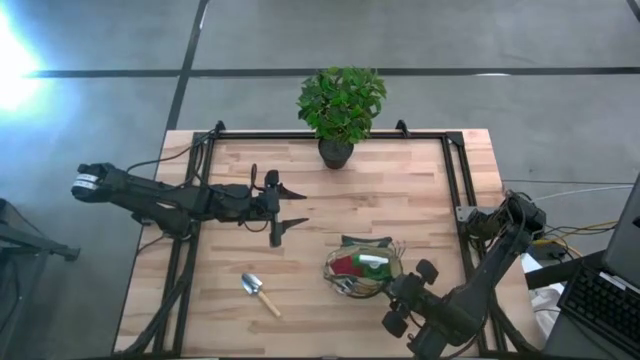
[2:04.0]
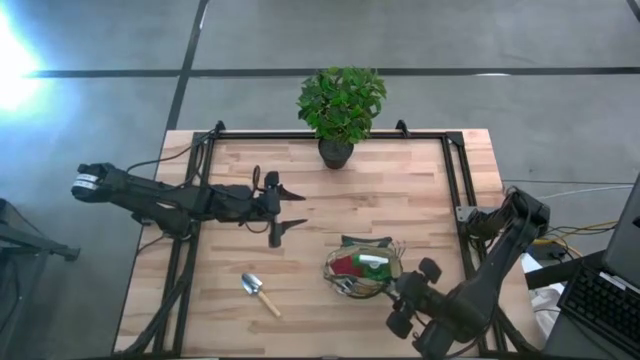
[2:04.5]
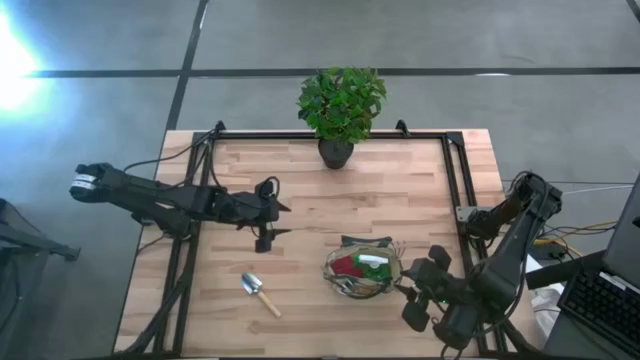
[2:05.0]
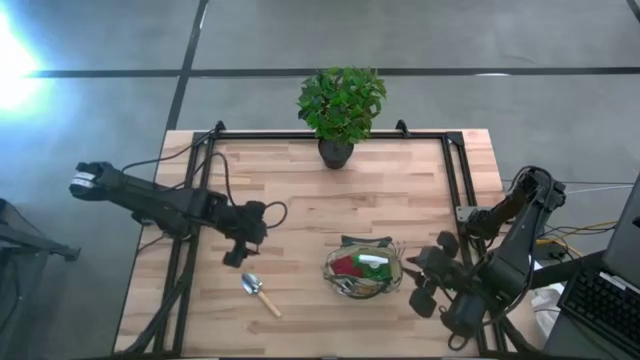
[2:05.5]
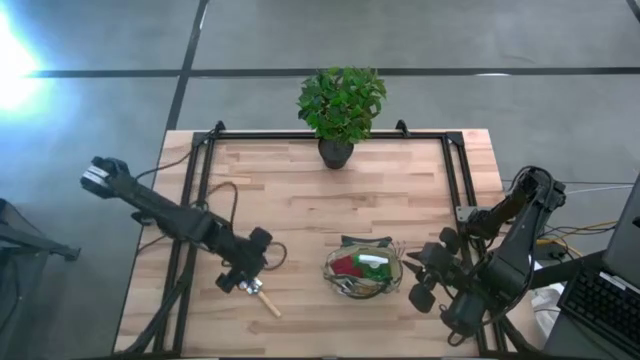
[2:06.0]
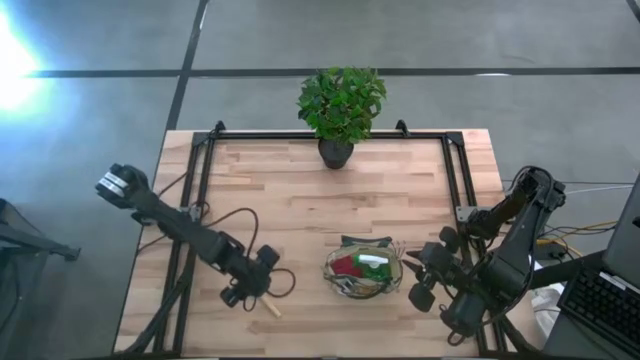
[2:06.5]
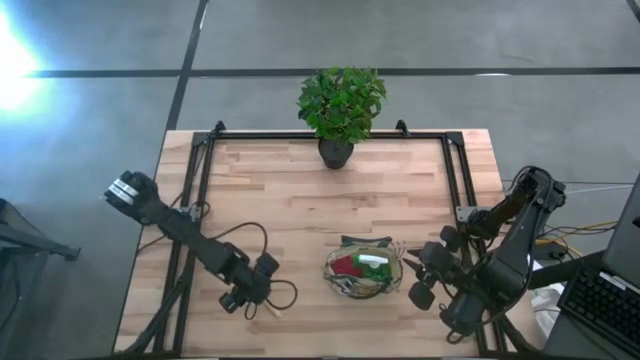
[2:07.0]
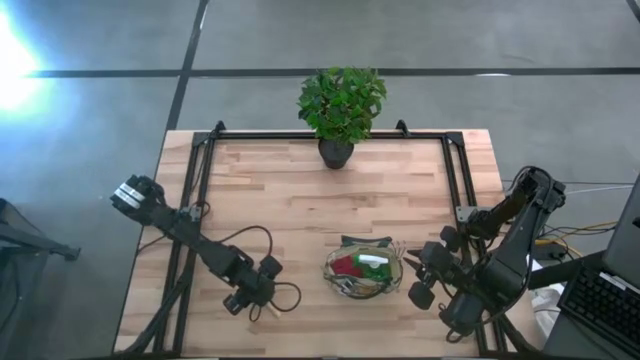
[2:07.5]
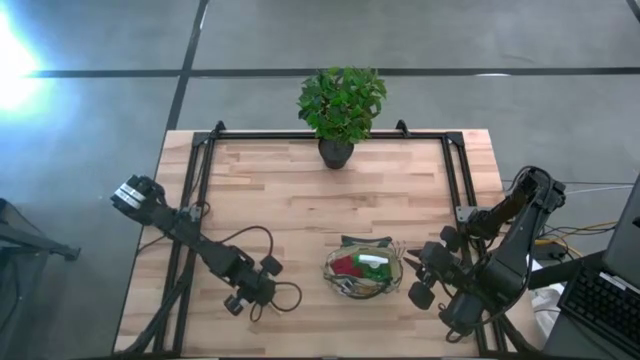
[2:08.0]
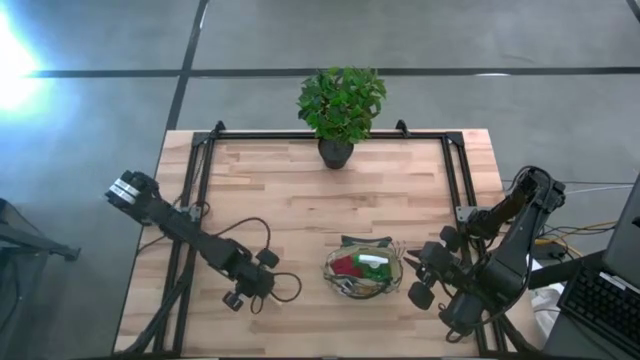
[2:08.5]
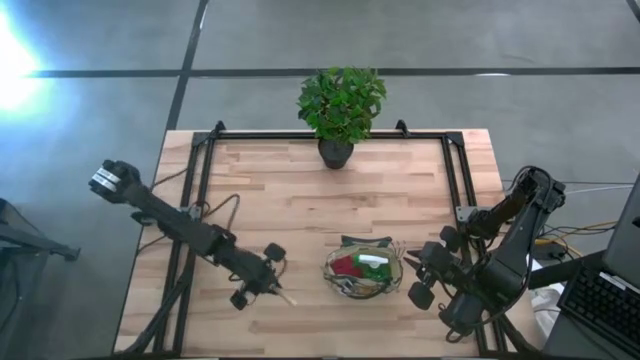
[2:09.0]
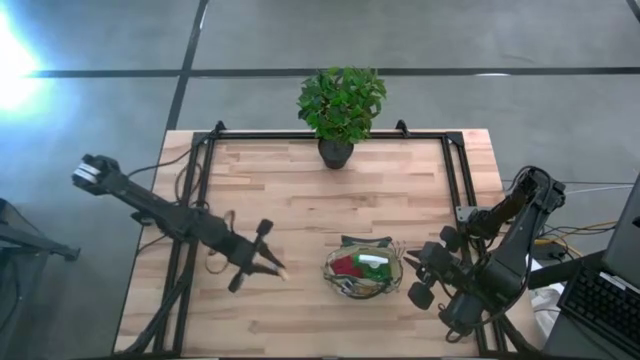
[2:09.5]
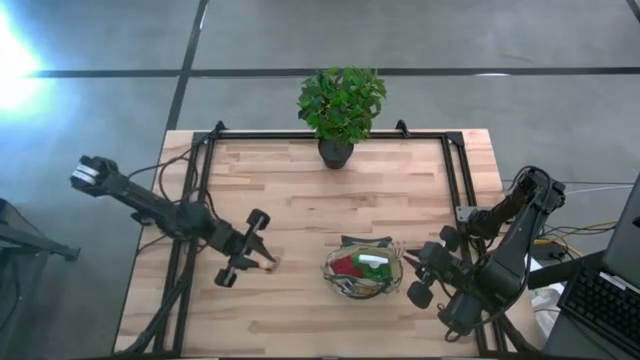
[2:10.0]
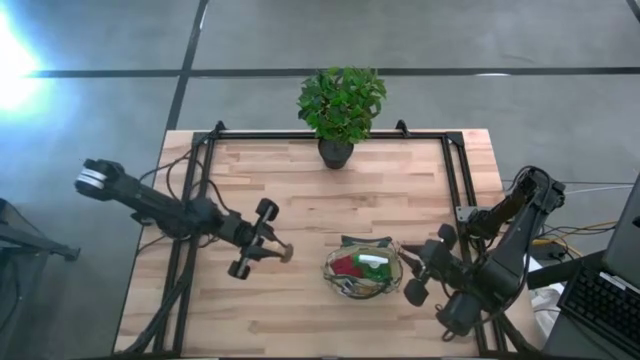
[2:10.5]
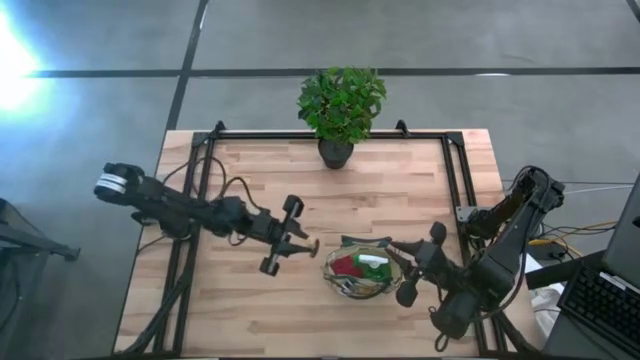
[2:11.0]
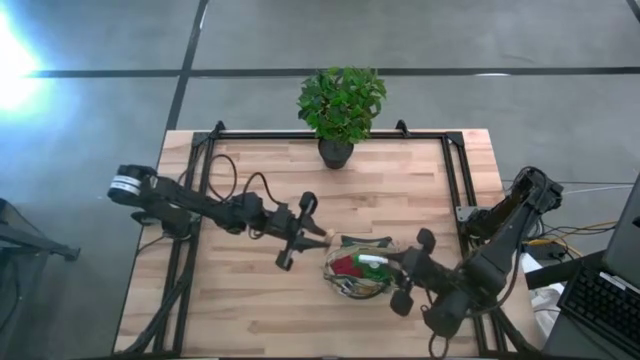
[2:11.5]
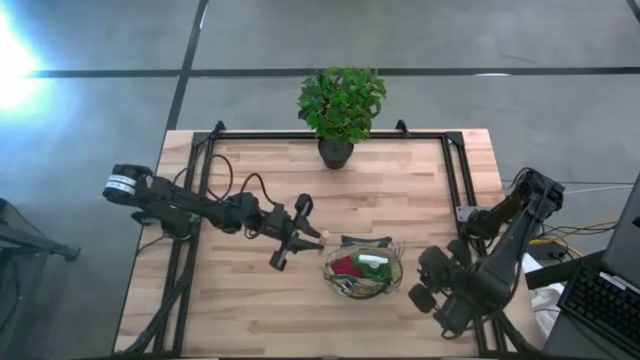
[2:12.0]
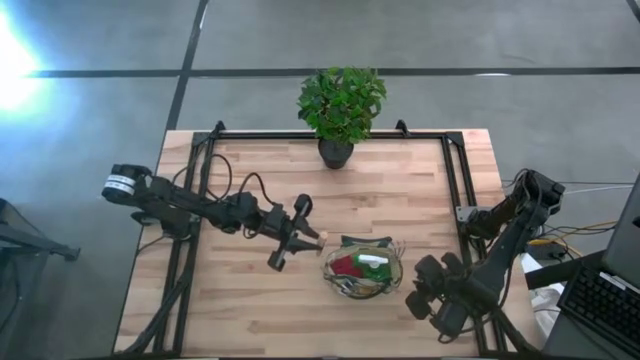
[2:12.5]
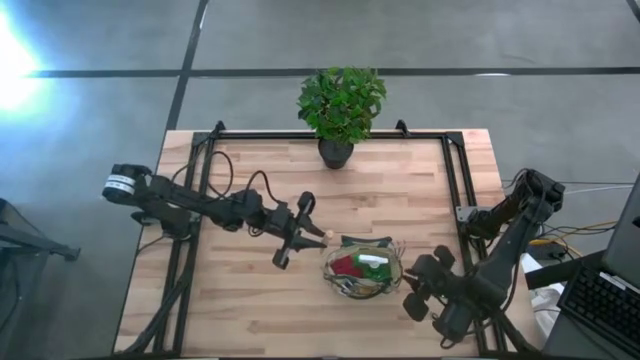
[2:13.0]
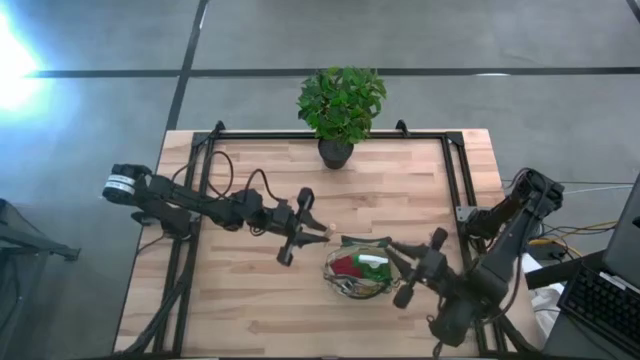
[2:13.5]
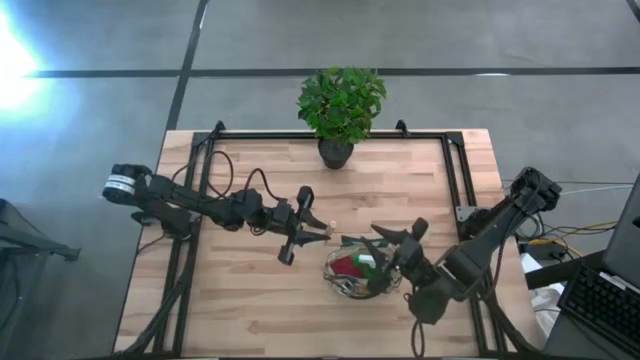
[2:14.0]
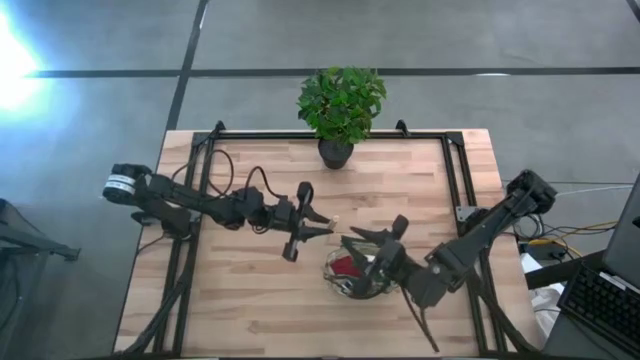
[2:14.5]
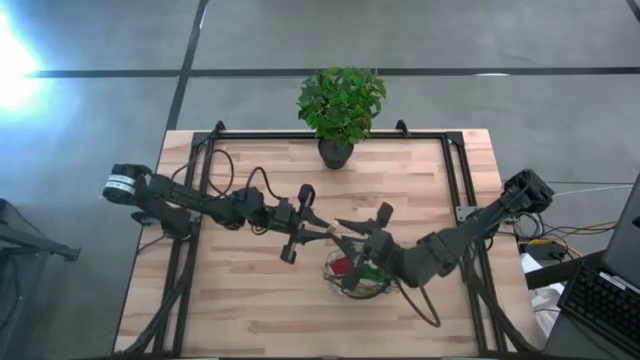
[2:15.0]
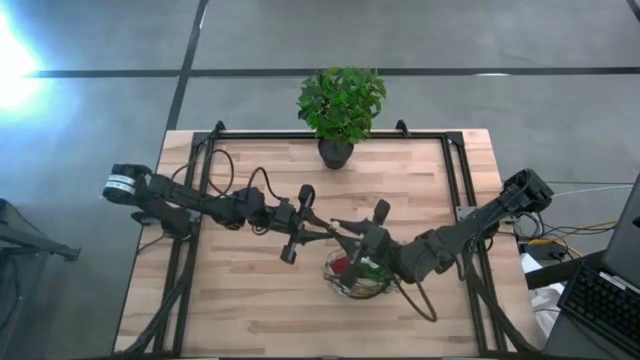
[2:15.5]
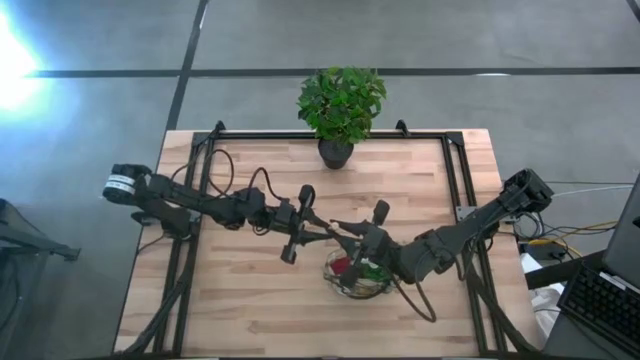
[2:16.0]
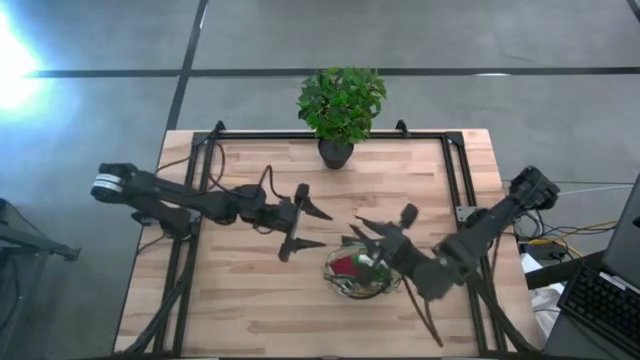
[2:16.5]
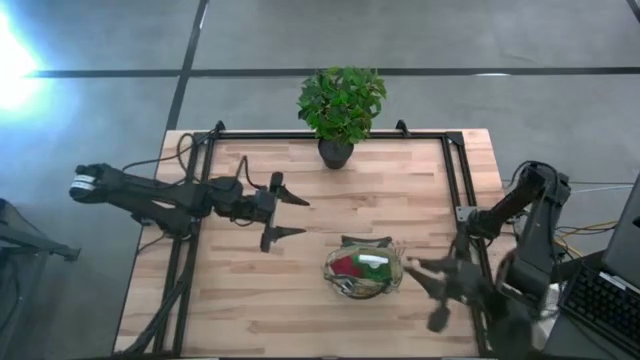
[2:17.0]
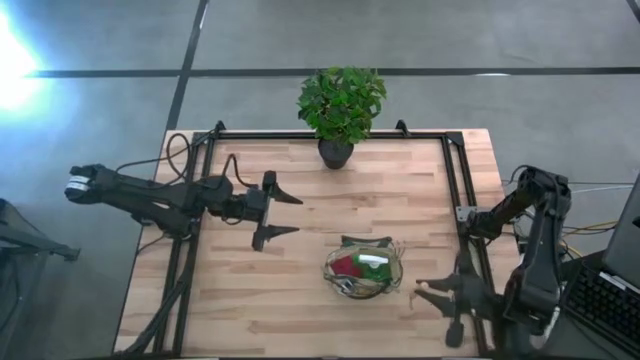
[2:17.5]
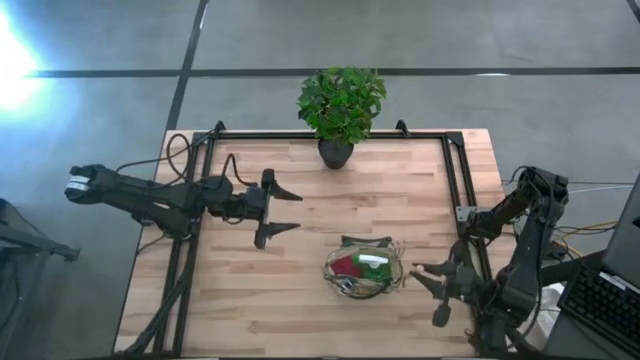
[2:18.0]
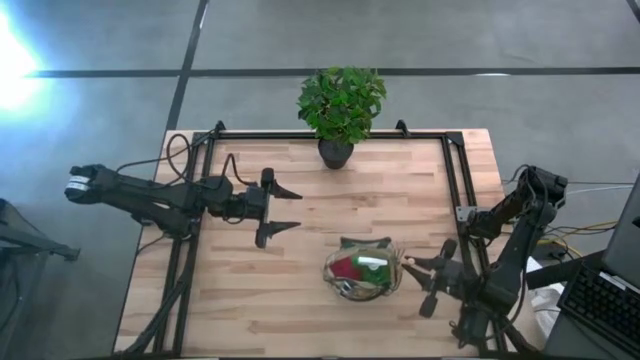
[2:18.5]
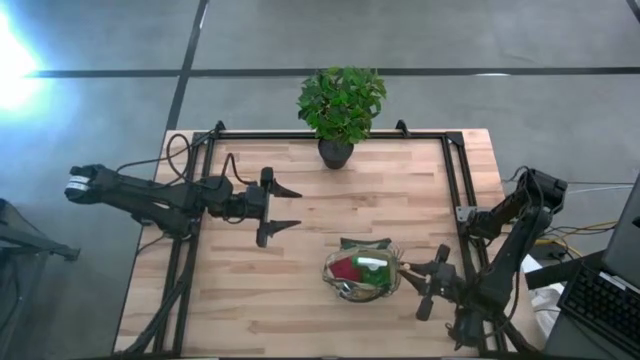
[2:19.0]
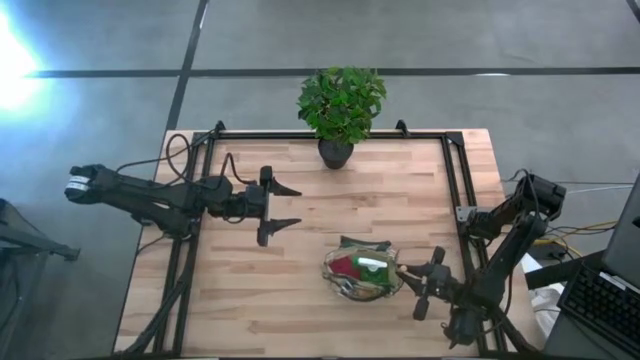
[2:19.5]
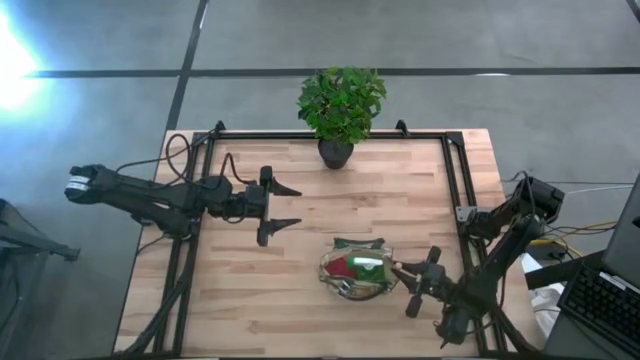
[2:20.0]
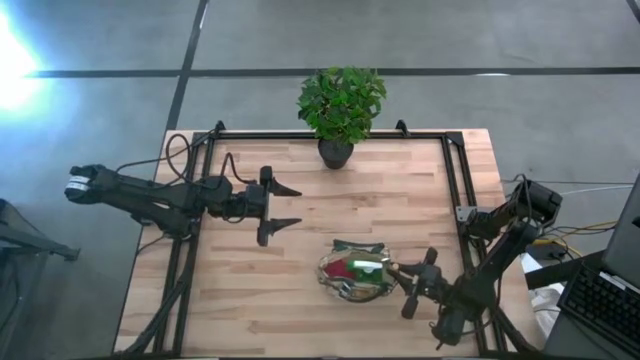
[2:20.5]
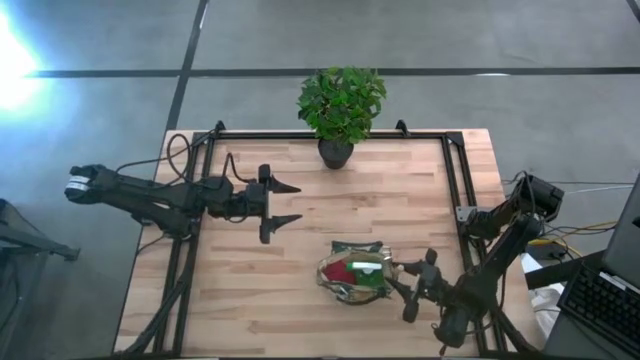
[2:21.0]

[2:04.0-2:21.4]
Task: Pick & Place Garden tools in Gardening bag
Put the brown trowel into the green gardening bag

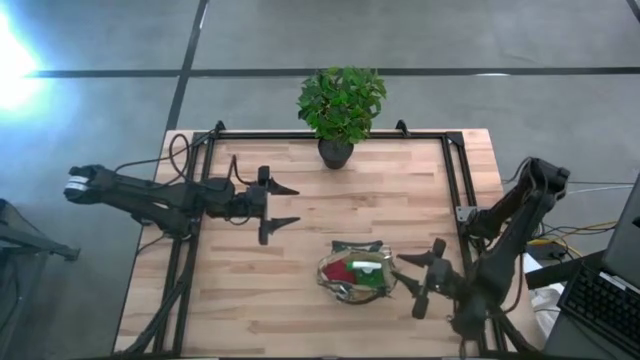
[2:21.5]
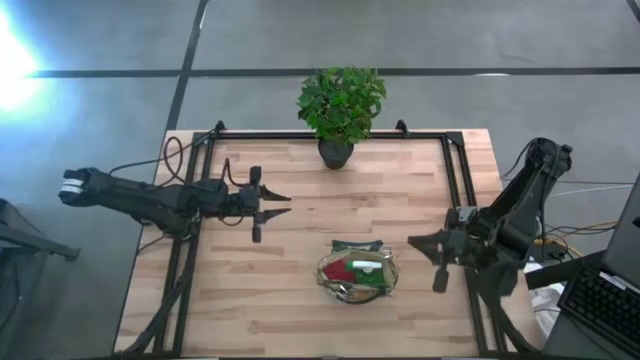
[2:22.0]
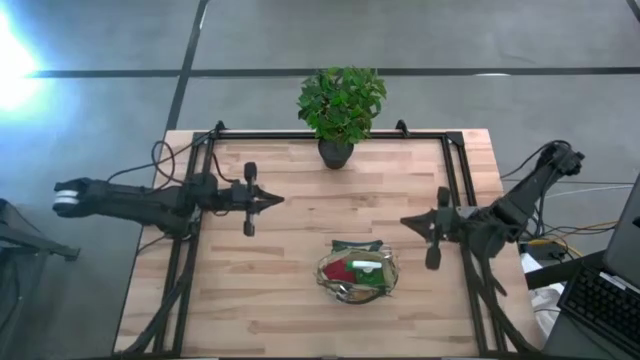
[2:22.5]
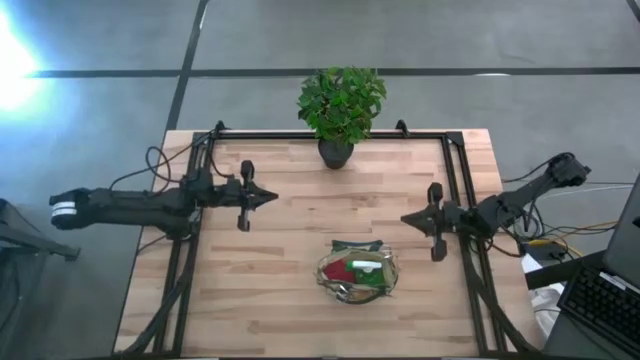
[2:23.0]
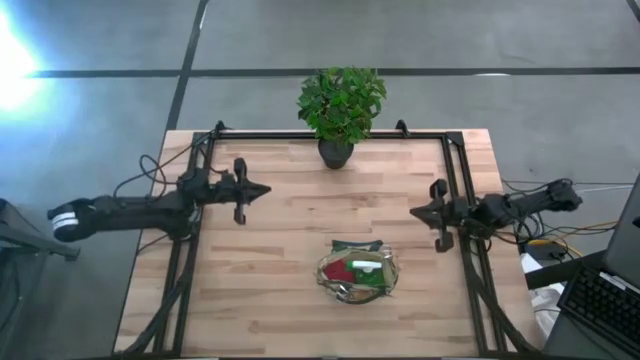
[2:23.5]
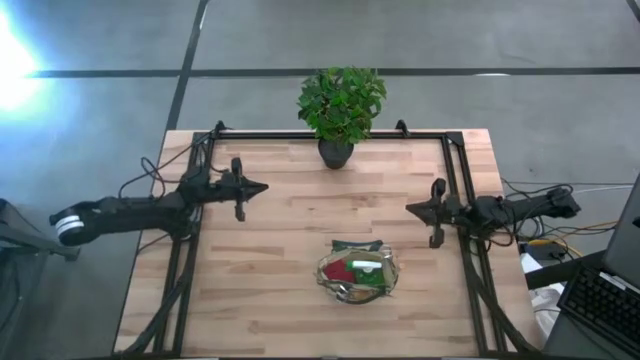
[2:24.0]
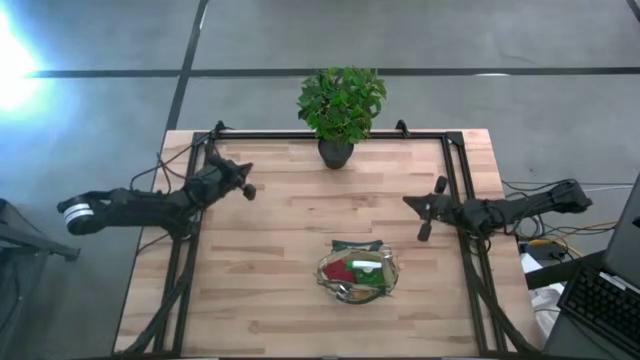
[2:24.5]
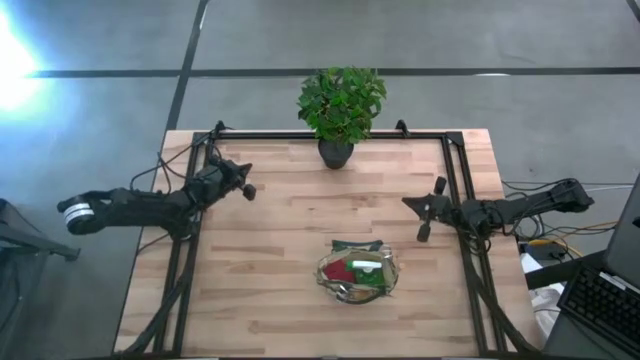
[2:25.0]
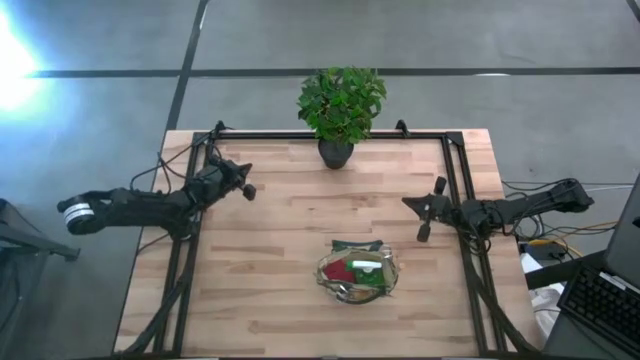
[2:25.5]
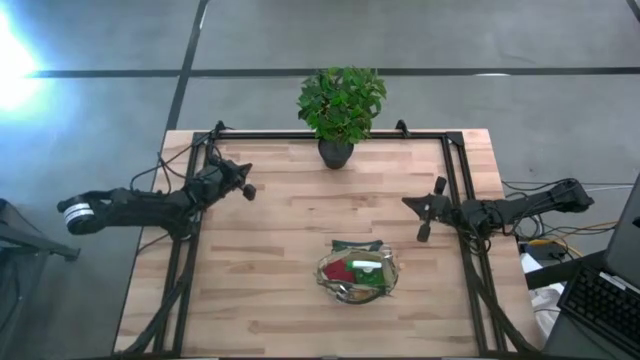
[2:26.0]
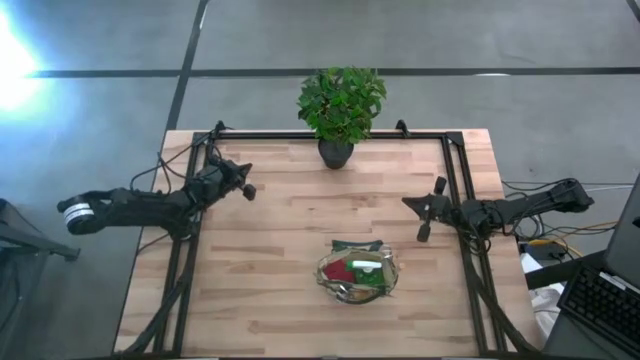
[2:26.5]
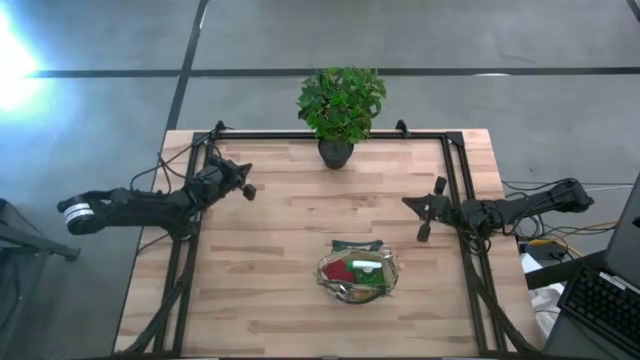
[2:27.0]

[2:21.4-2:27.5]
Return to Home Position
